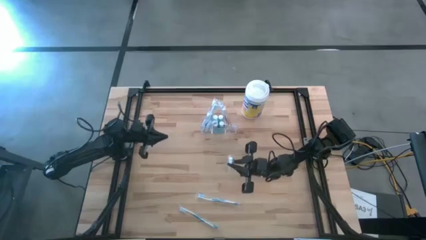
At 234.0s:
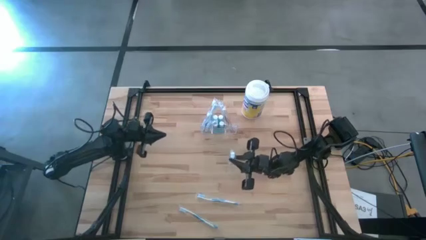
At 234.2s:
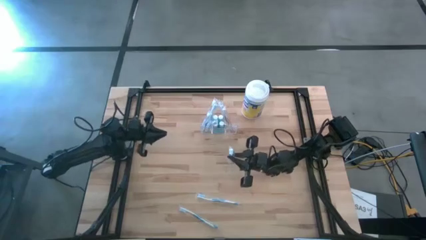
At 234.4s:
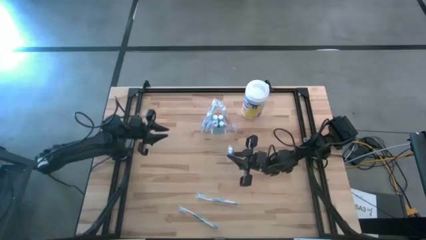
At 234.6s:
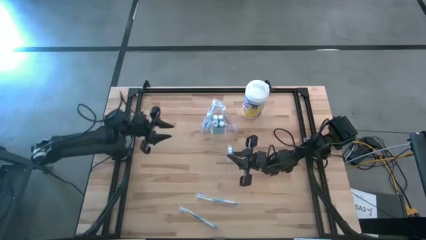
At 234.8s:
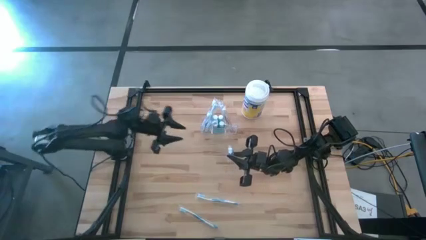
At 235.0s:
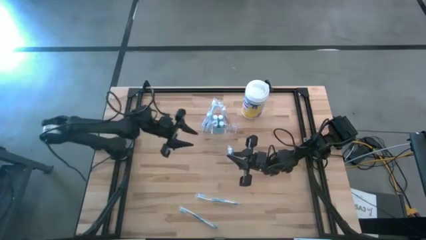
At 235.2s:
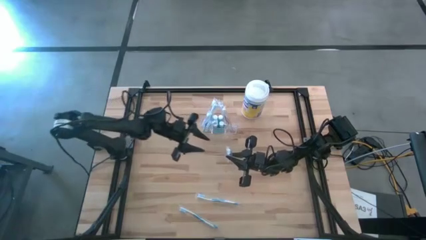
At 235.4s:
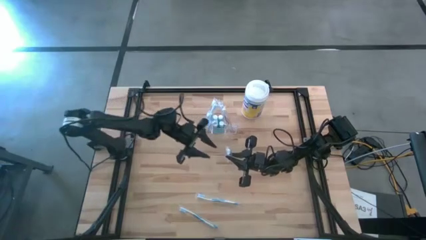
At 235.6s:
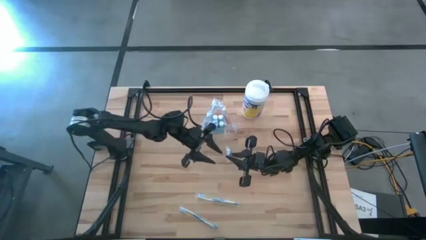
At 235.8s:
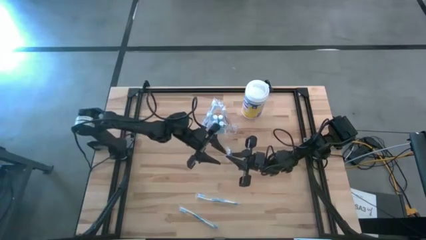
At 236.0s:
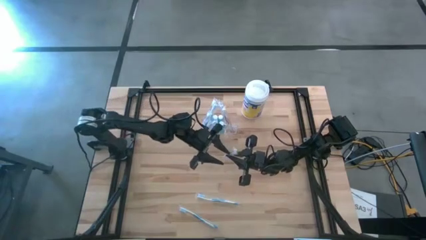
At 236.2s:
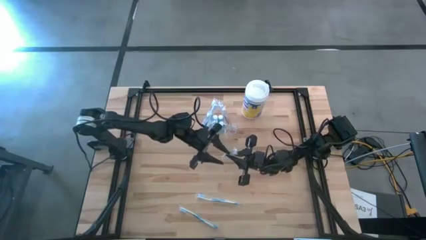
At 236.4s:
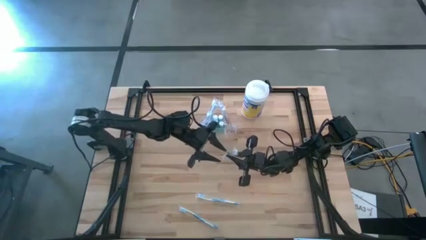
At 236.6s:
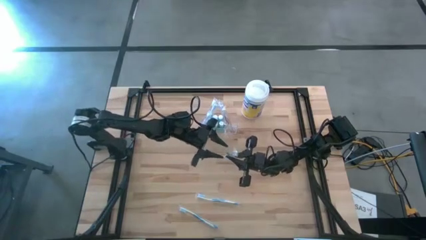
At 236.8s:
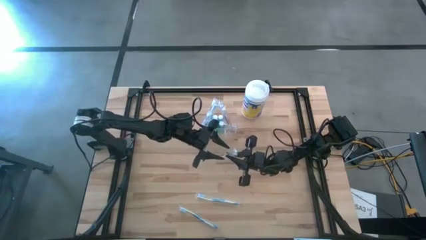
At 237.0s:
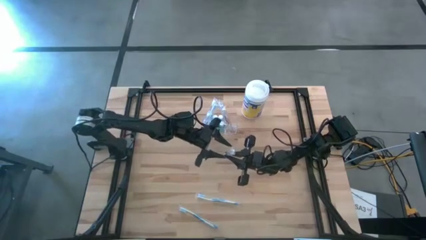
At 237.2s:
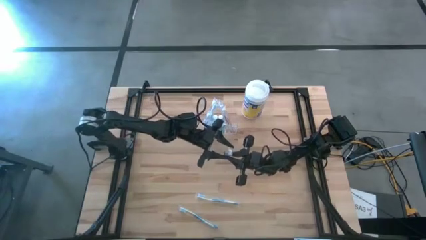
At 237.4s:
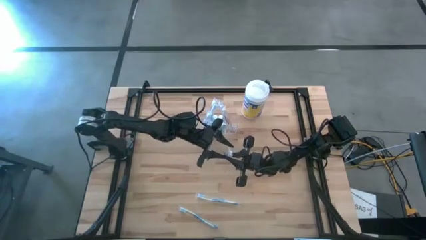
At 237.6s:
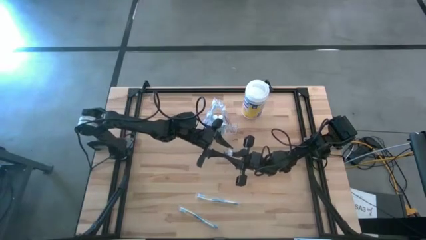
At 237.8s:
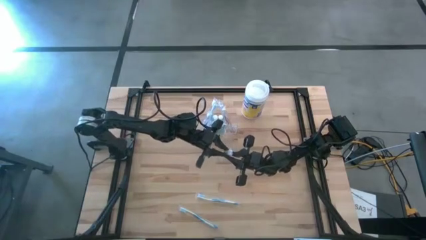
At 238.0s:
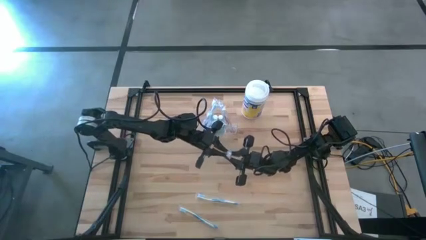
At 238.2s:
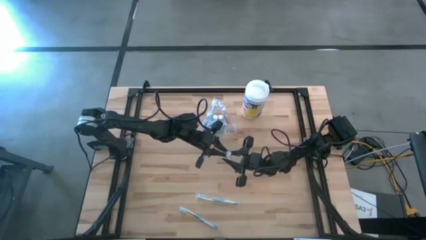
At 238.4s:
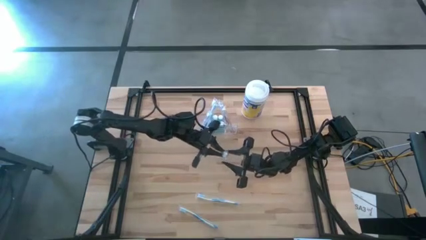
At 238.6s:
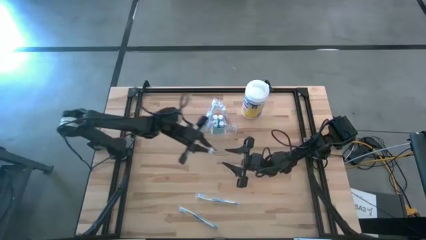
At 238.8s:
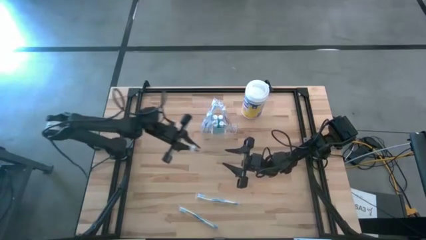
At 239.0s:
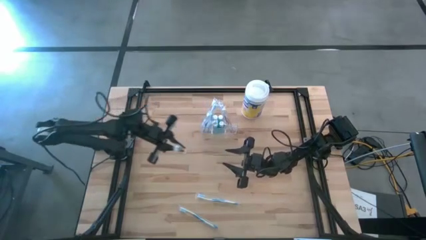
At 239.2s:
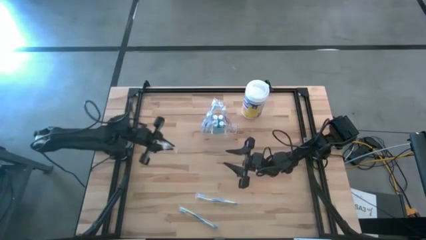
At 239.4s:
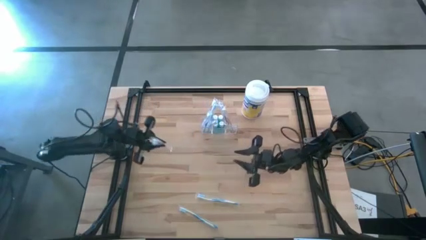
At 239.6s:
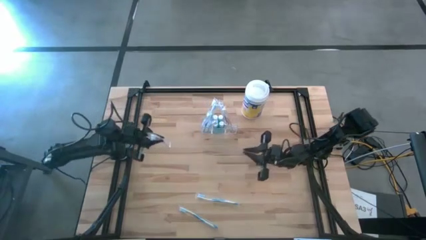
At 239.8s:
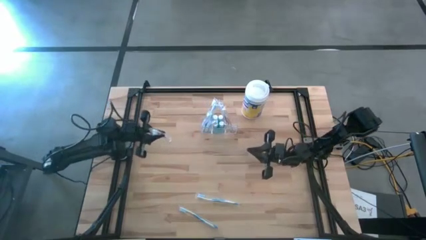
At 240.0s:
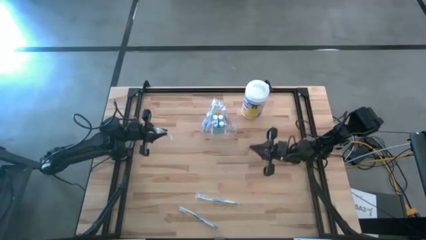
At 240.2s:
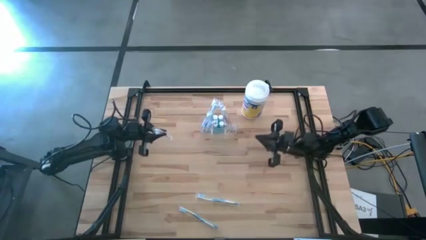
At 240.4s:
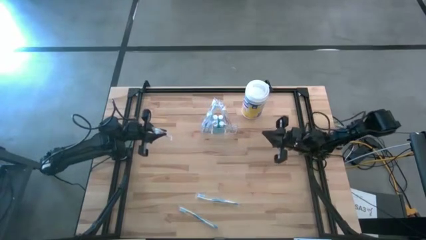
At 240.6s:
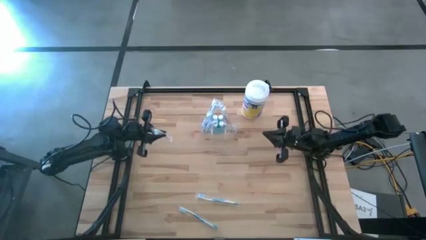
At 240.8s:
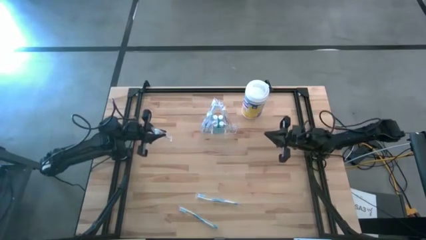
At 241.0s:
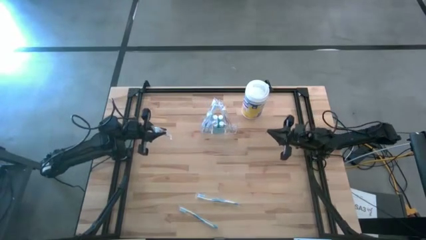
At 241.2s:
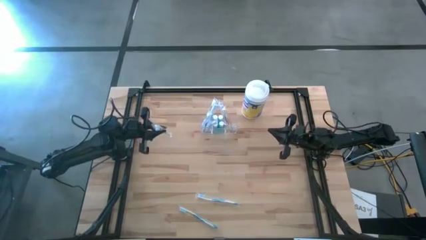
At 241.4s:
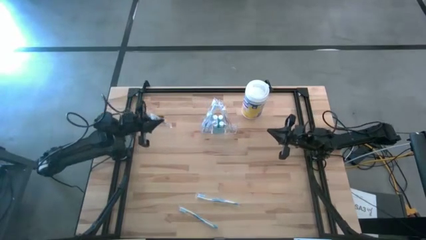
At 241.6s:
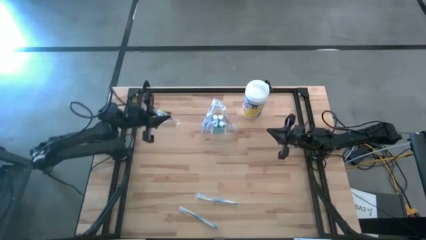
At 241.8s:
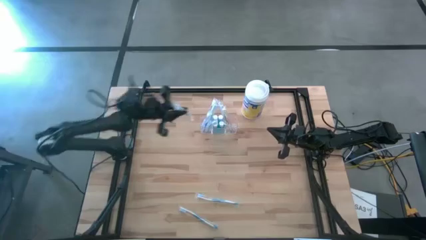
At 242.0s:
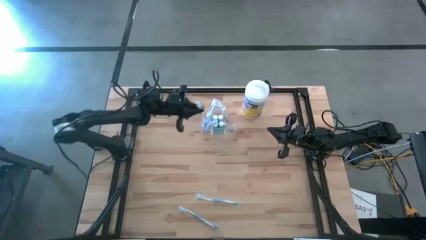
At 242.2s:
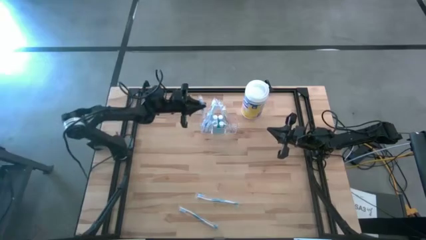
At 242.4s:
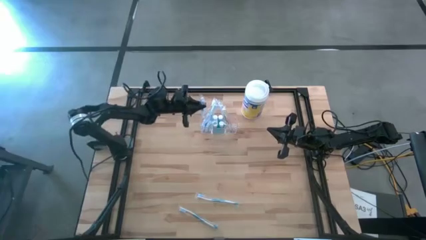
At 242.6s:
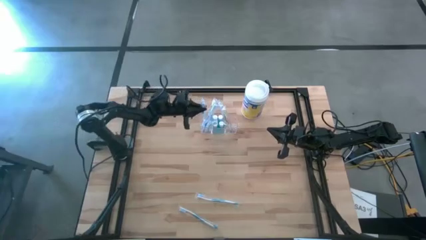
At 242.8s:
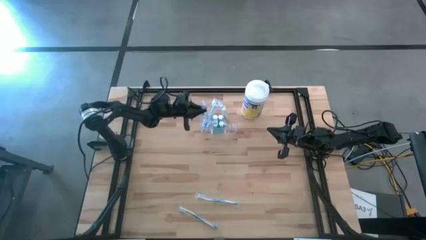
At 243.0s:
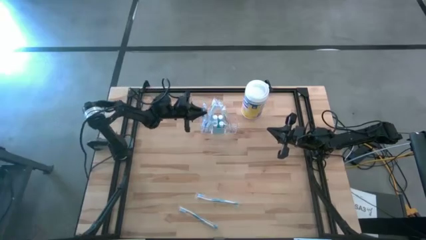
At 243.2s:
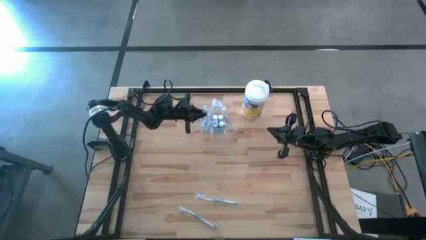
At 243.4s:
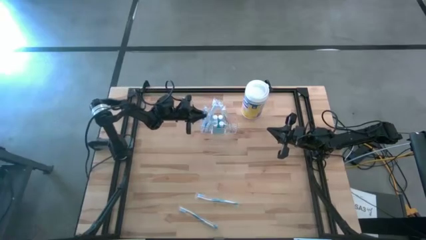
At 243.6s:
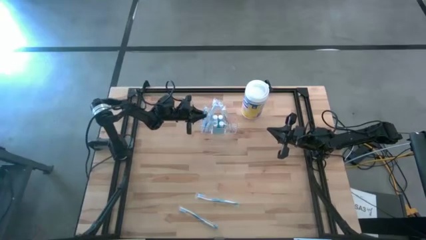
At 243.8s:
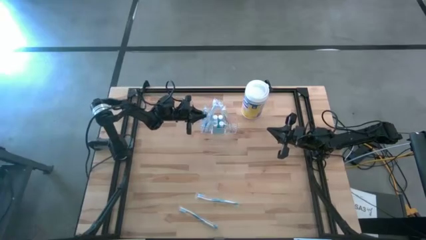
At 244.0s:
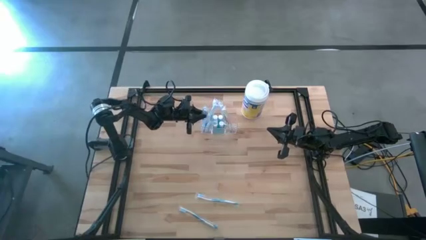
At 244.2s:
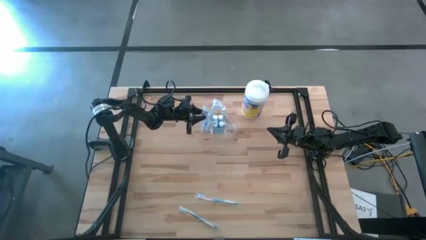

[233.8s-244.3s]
Task: Pick & Place toothbrushing station
Put the blue toothbrush into the transparent organizer
